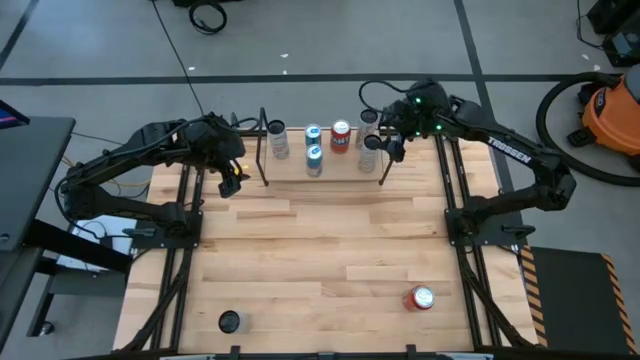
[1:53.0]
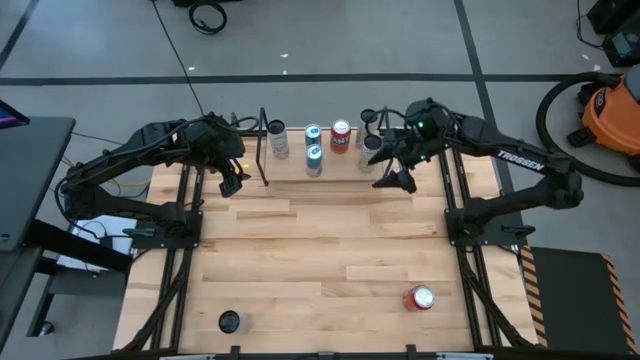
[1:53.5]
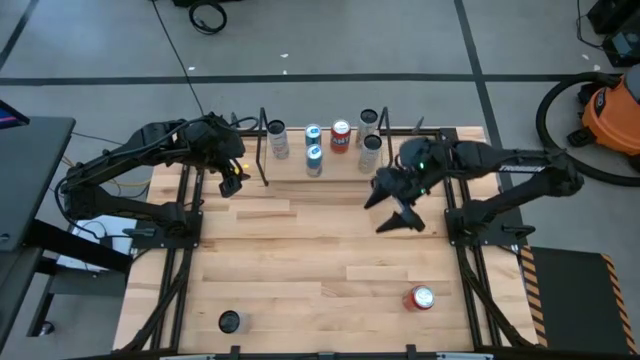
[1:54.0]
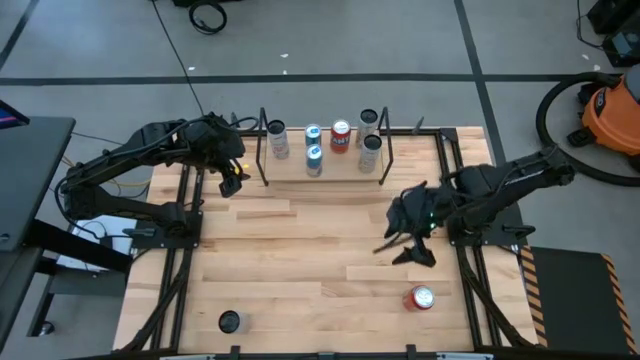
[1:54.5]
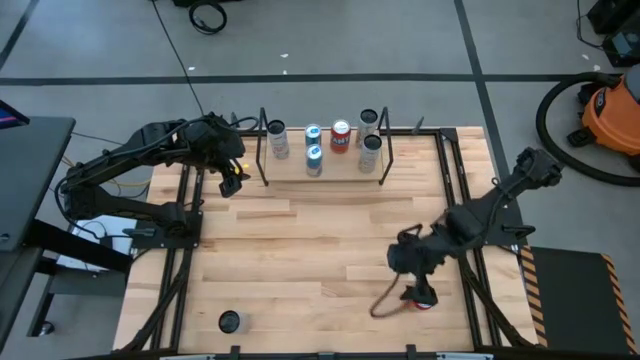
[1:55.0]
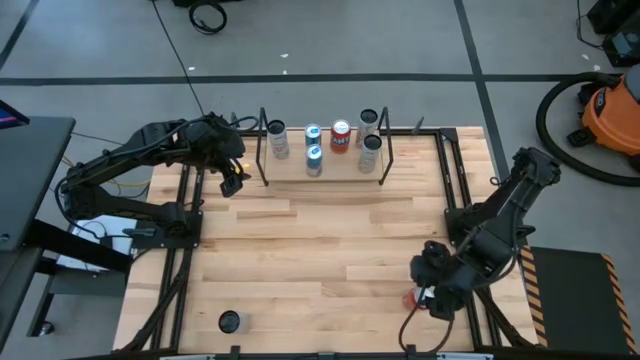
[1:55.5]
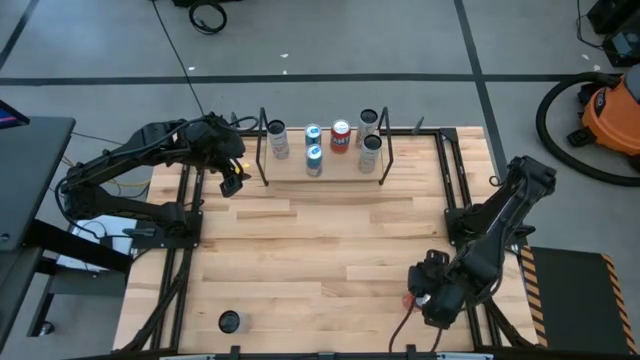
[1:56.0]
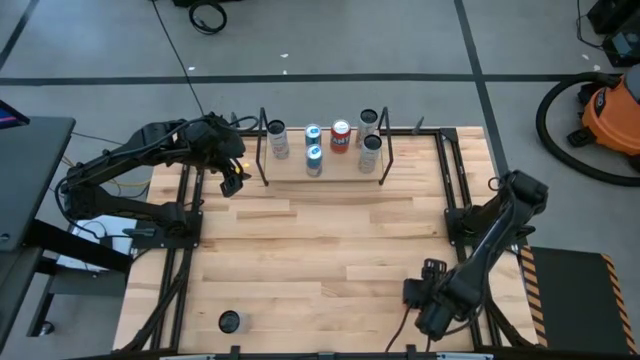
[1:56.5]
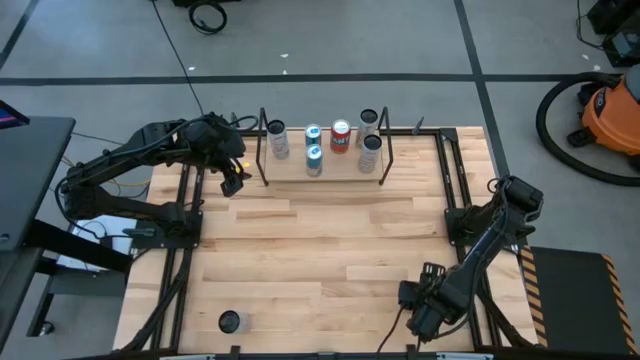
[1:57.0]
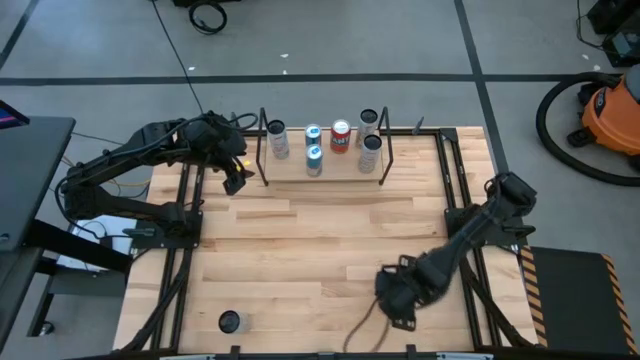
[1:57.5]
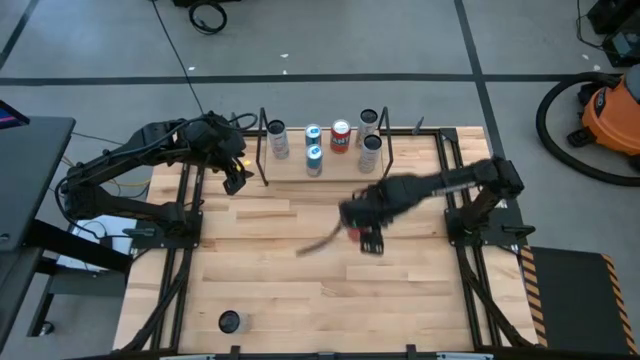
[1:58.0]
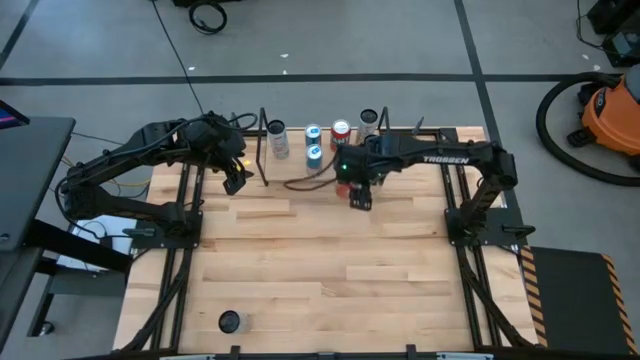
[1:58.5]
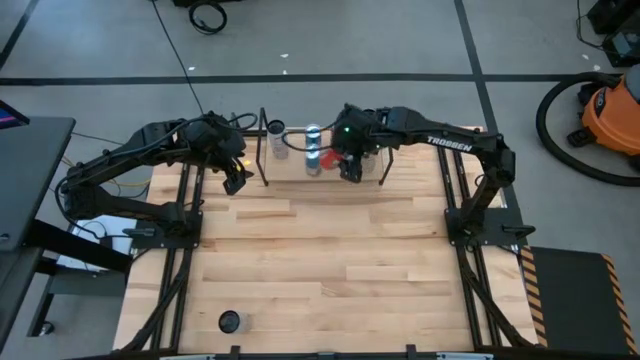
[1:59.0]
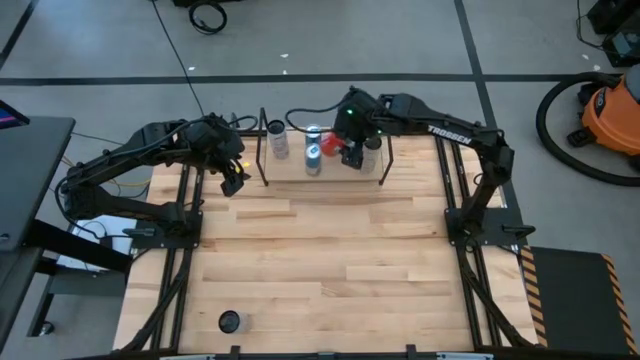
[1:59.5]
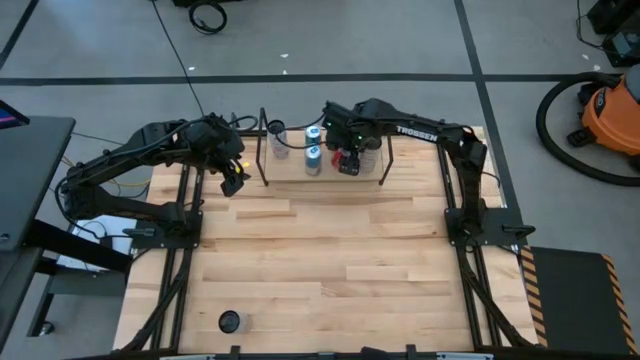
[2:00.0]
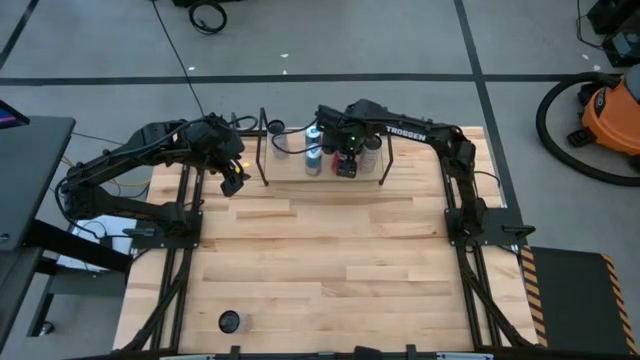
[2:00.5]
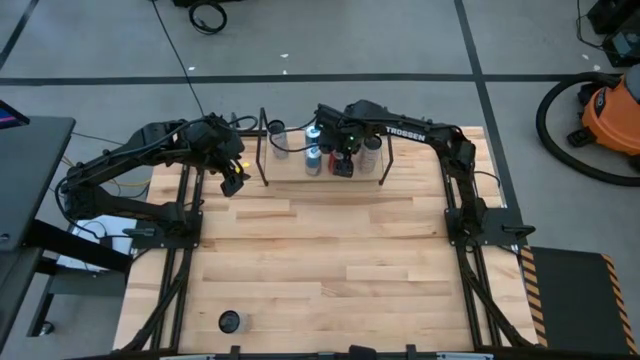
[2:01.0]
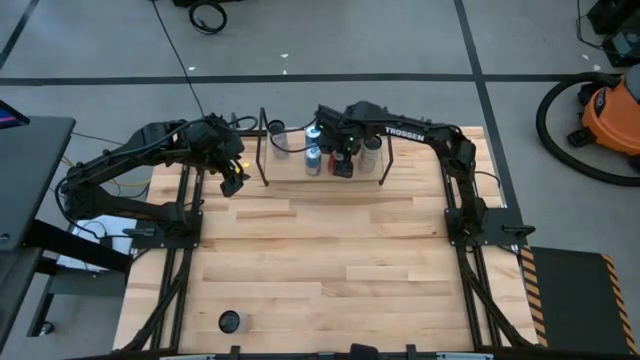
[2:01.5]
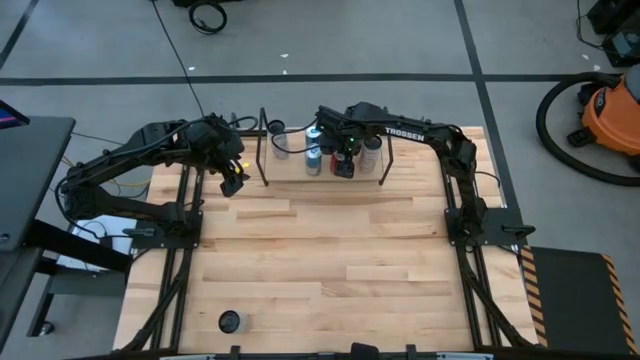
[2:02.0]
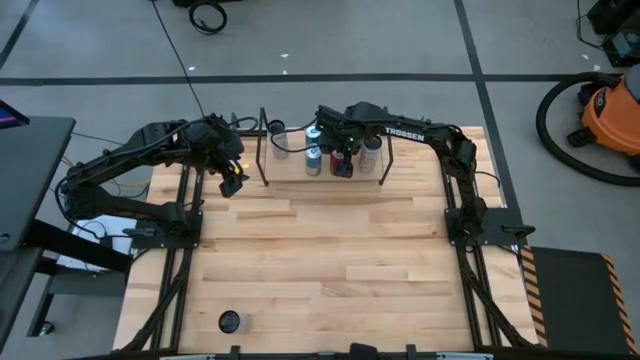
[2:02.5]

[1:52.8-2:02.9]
Task: Place canned beverage on shelf
Put the red soda can on the shelf aligned with the other red soda can

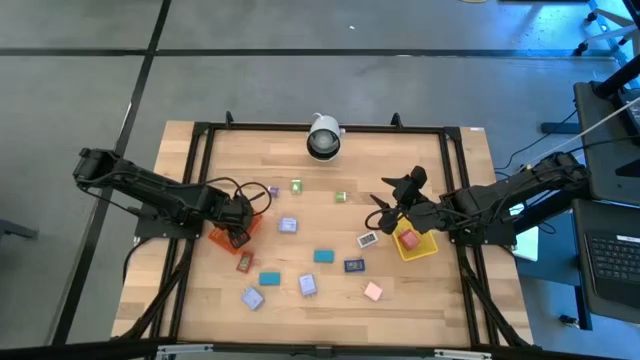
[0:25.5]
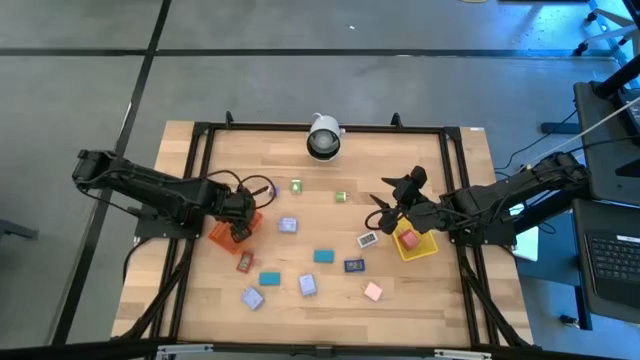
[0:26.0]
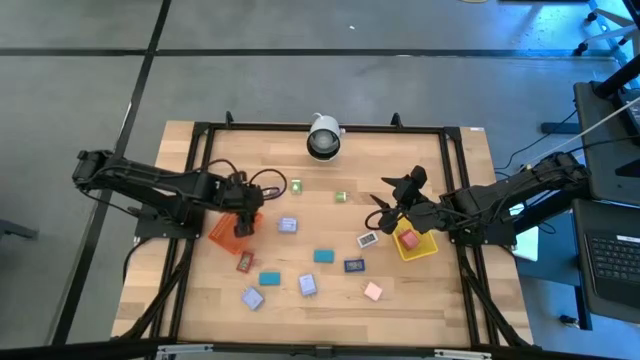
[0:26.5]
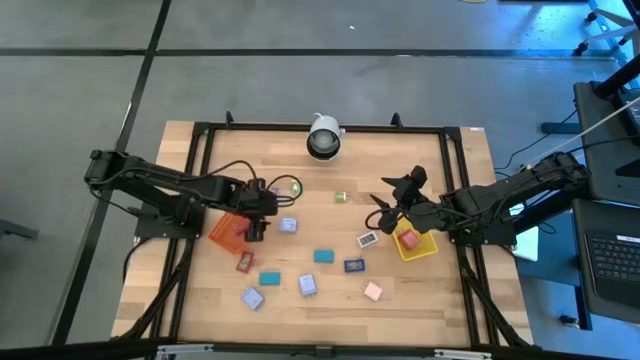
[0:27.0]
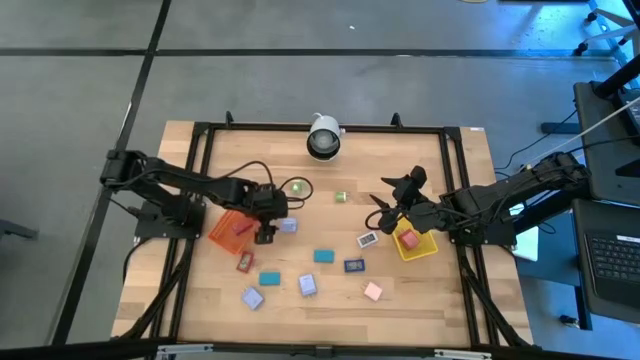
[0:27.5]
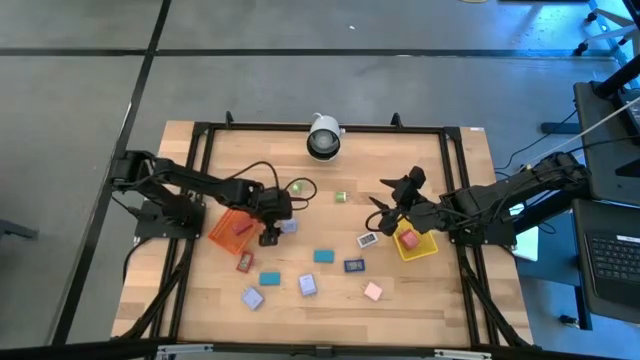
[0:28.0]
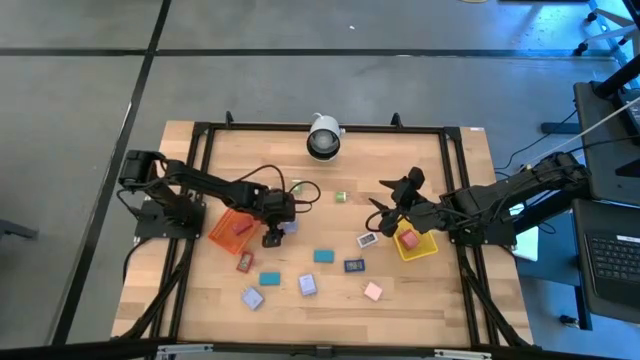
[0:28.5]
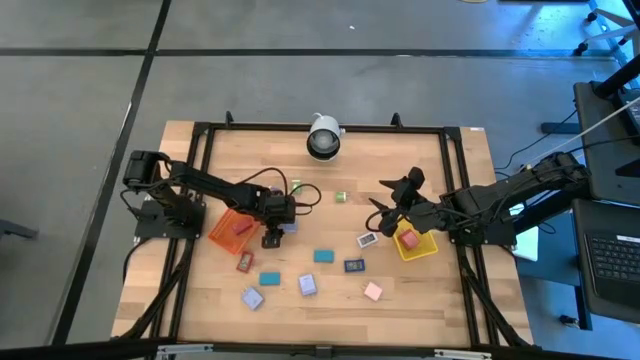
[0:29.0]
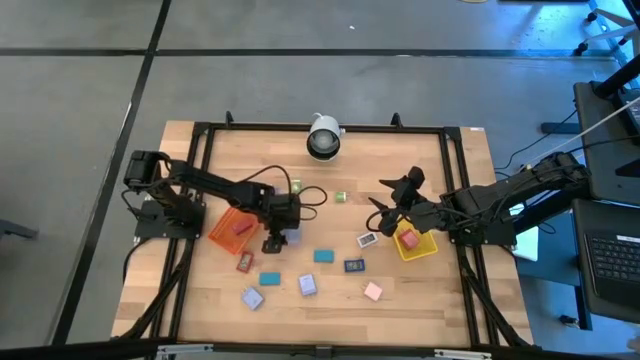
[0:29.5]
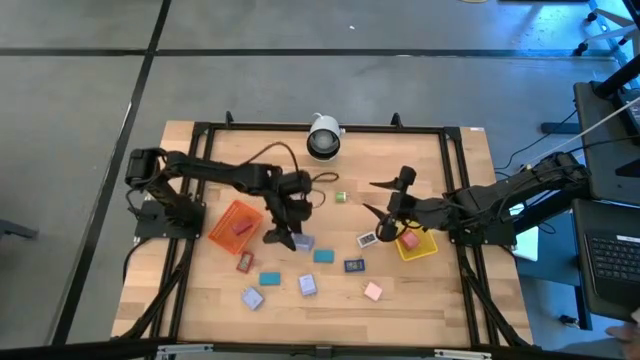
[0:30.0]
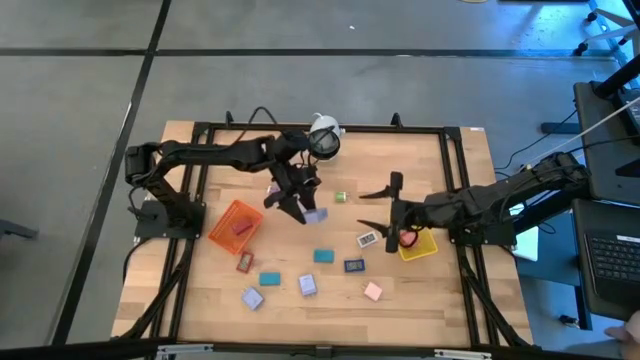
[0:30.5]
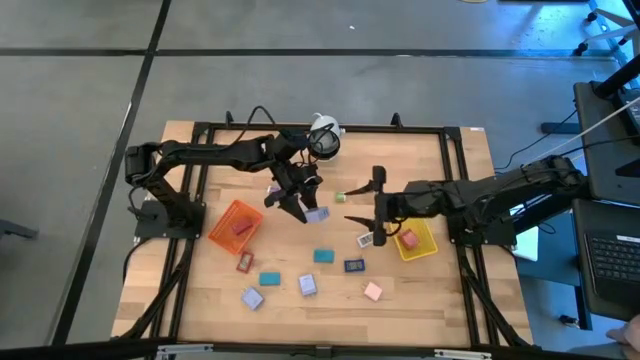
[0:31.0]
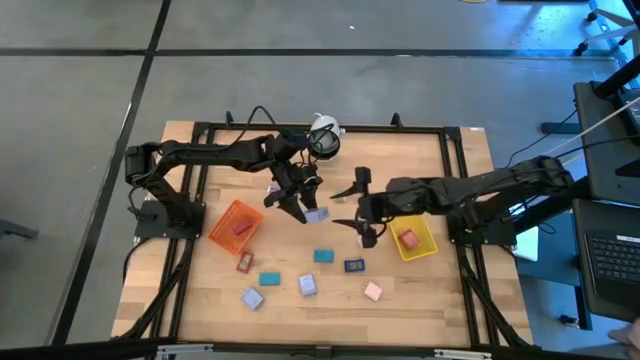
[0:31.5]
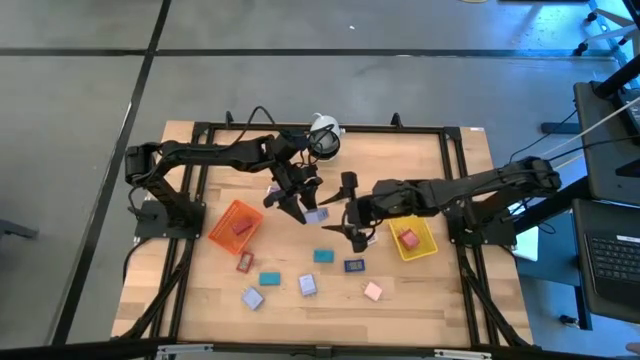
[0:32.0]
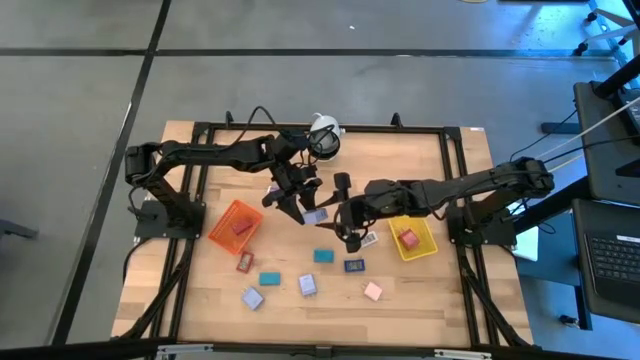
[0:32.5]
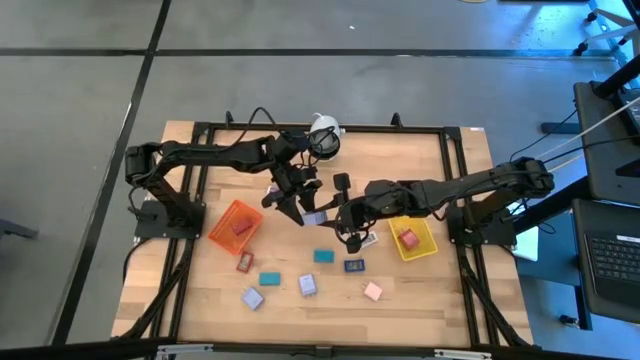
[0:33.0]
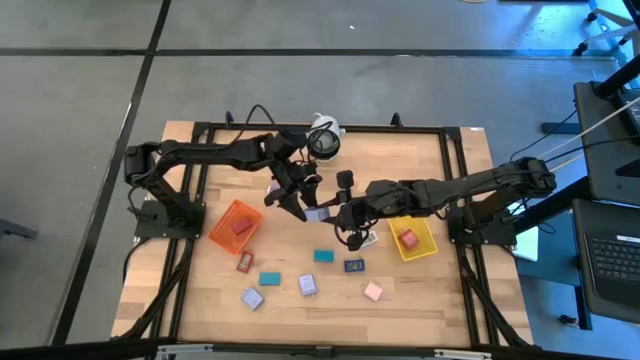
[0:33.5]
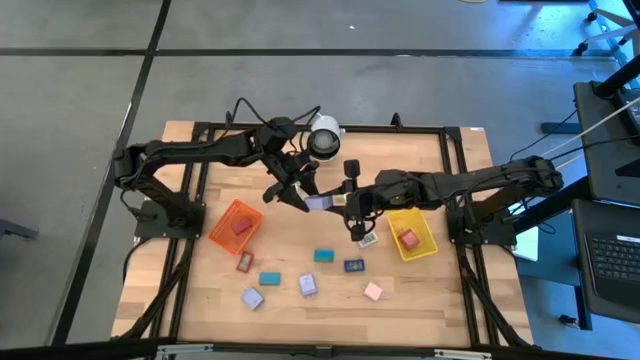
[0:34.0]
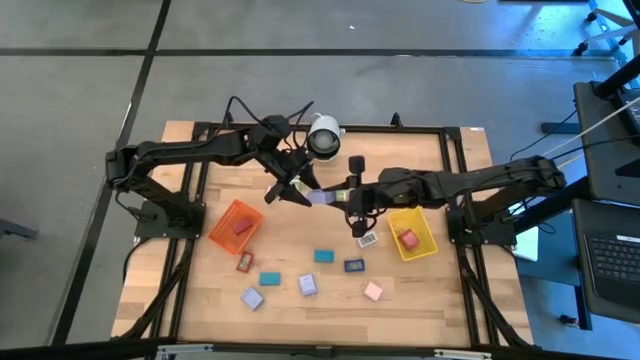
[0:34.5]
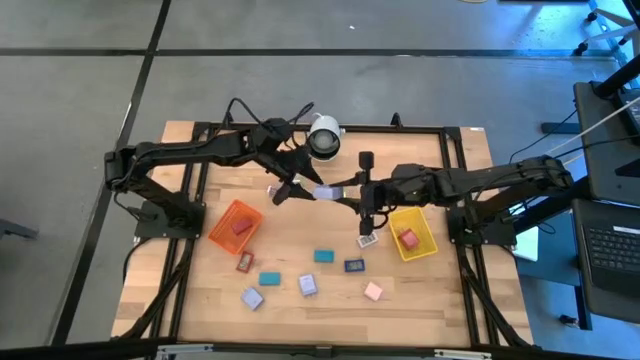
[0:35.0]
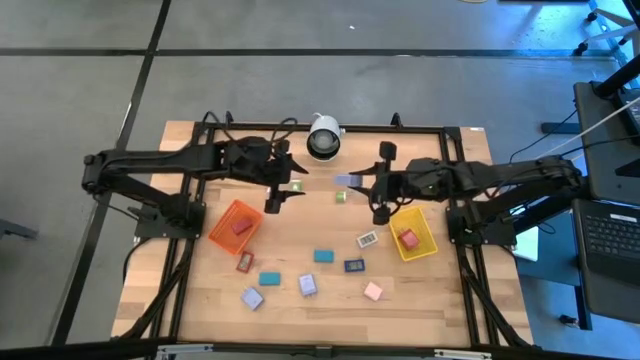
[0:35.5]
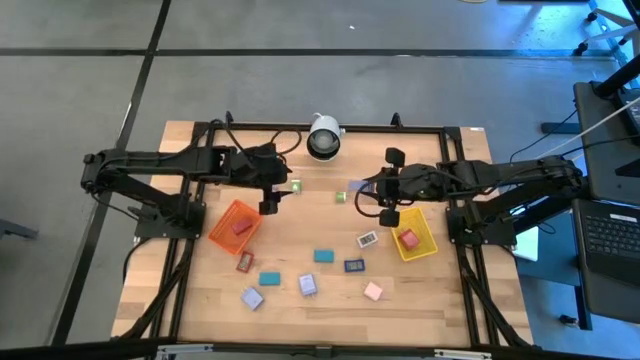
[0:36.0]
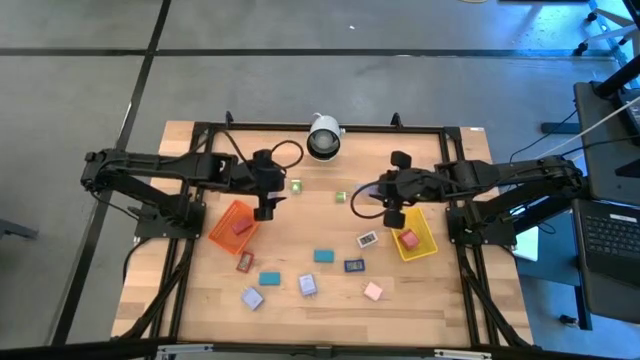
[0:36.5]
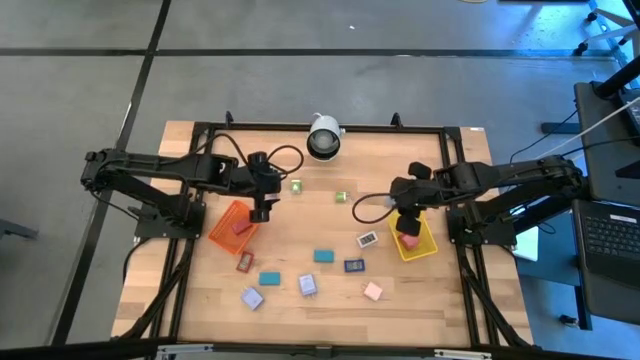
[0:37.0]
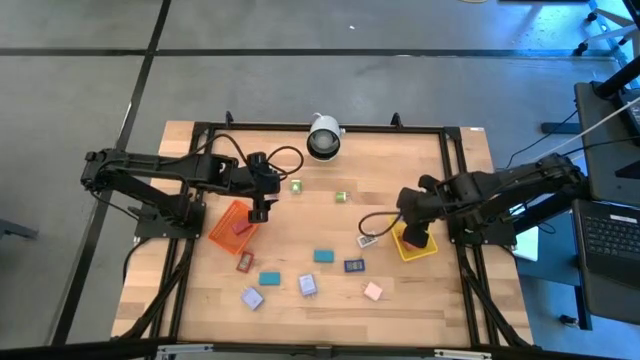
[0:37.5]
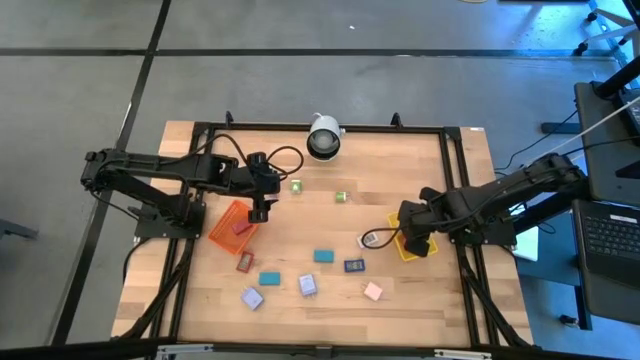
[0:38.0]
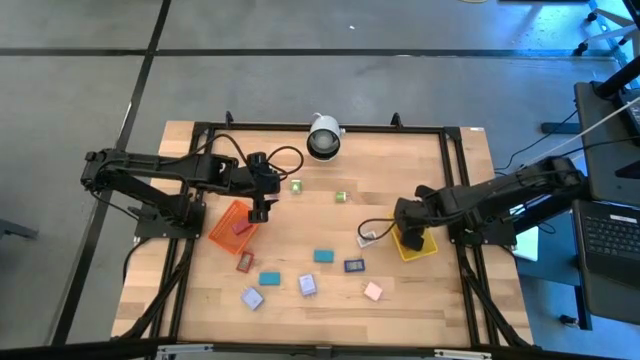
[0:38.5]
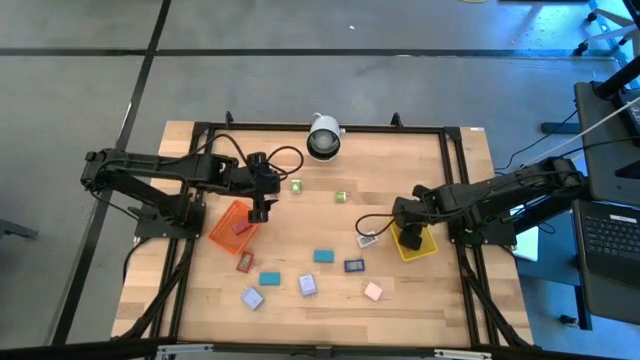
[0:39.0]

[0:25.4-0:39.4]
Task: Pick & Place Office items
Put the top purple charger adapter into the yellow basket
